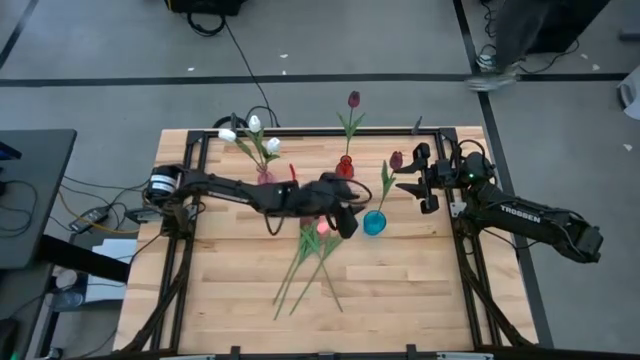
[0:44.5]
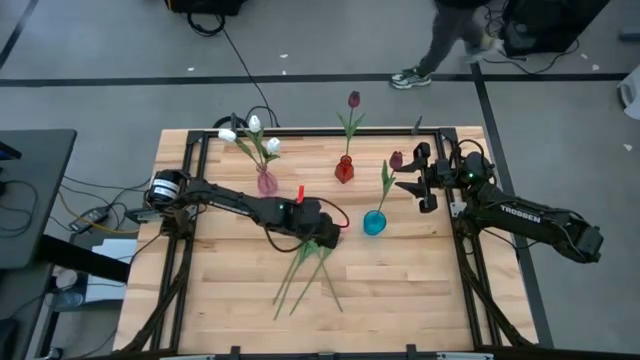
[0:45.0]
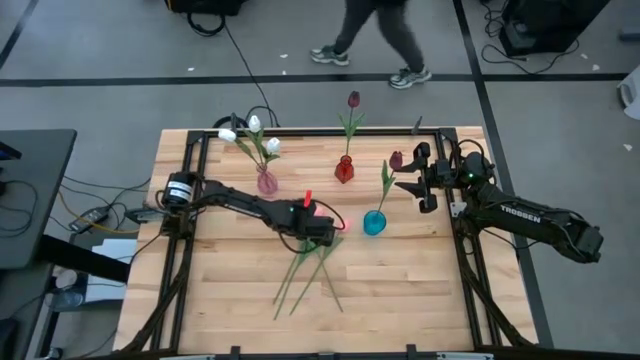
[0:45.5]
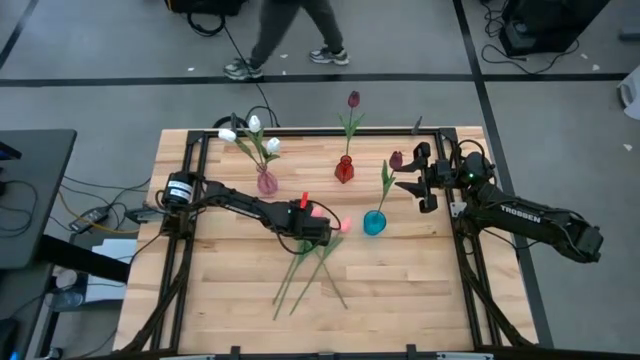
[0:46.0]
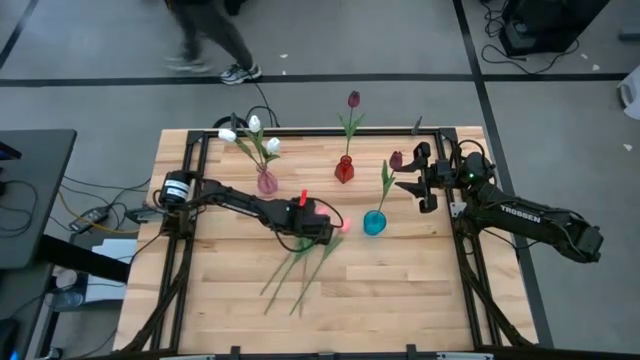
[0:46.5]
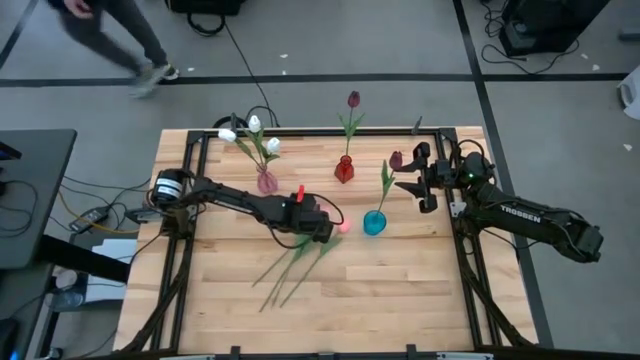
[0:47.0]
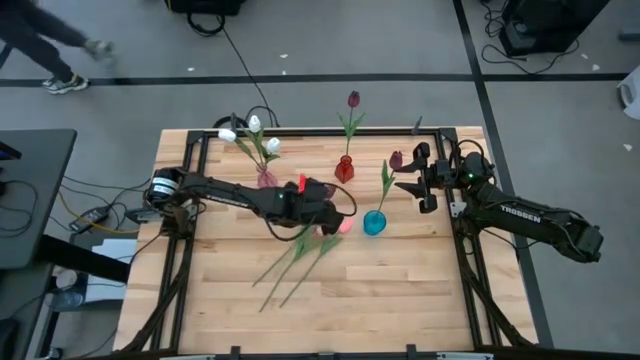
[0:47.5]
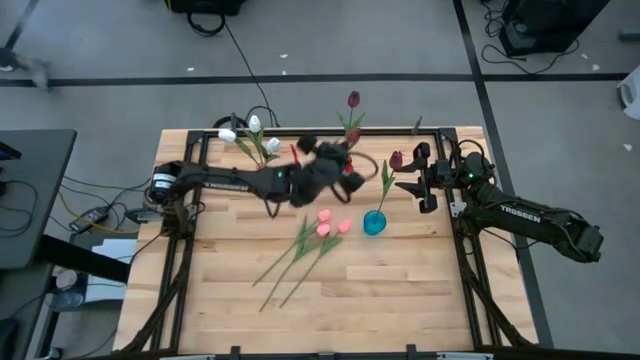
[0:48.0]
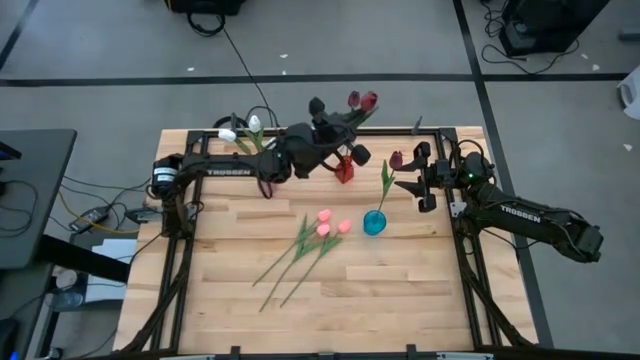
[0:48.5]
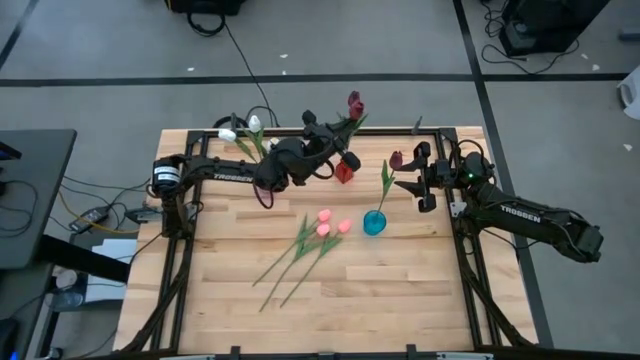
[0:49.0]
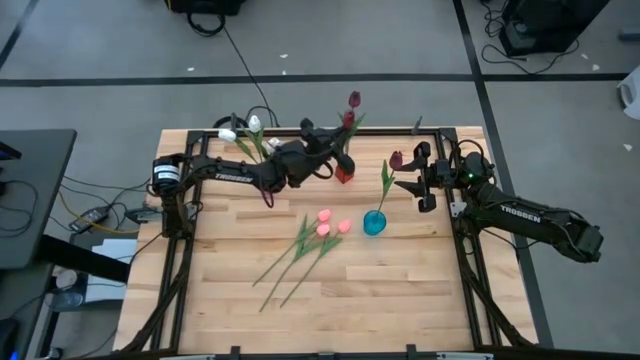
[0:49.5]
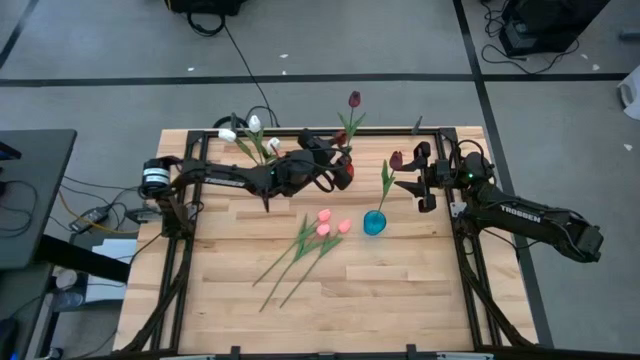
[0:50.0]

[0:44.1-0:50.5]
Task: Sort flowers into vase by color
Put the red tulip into the red vase

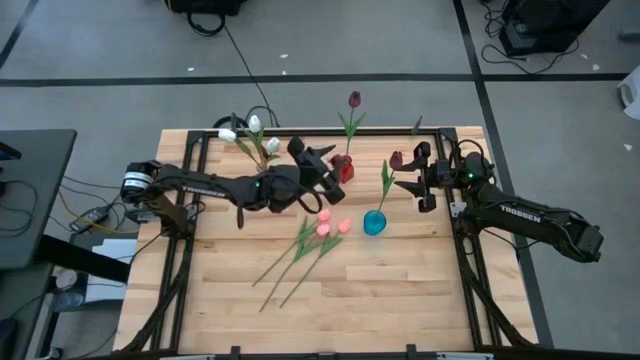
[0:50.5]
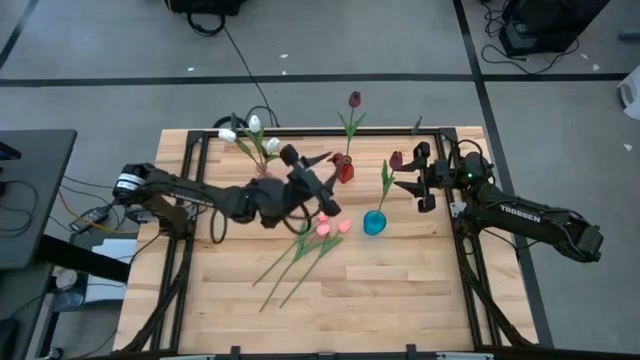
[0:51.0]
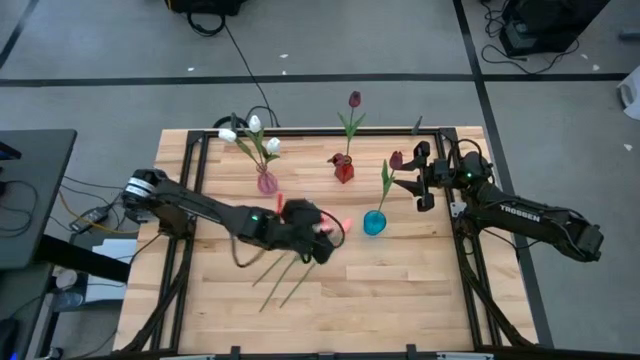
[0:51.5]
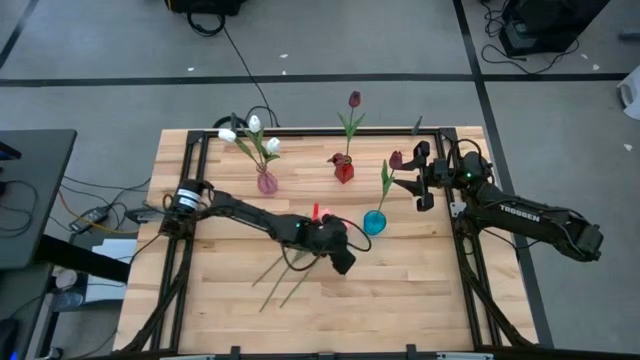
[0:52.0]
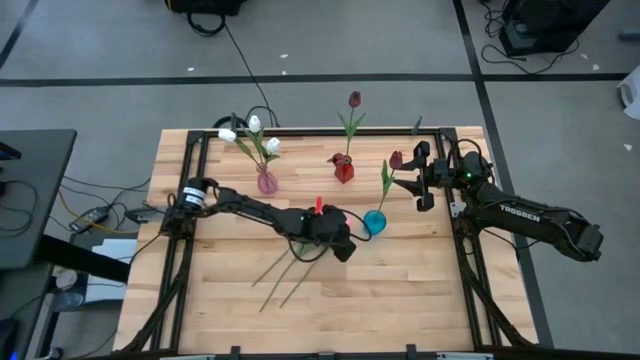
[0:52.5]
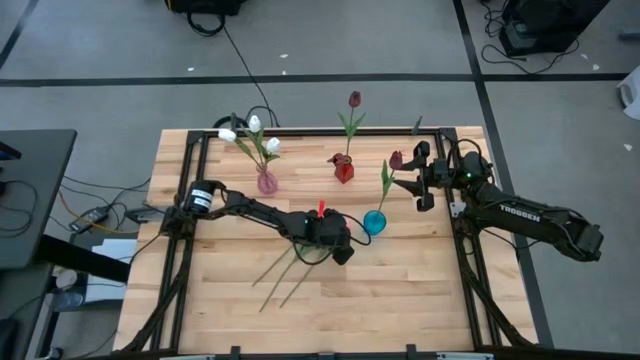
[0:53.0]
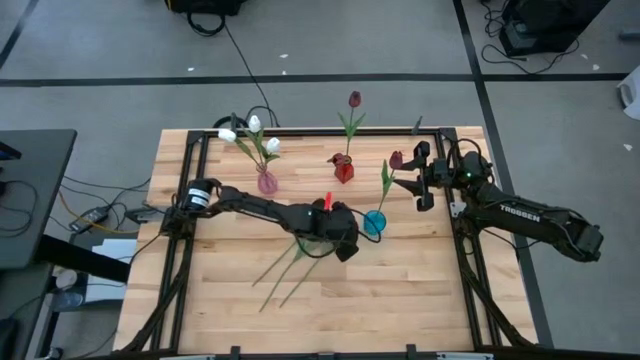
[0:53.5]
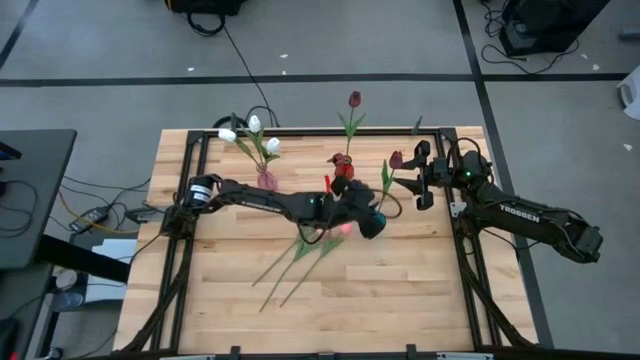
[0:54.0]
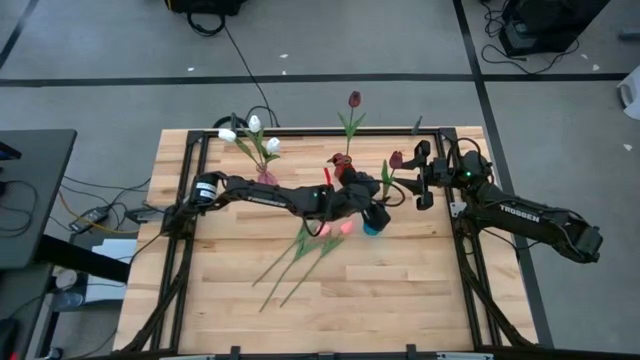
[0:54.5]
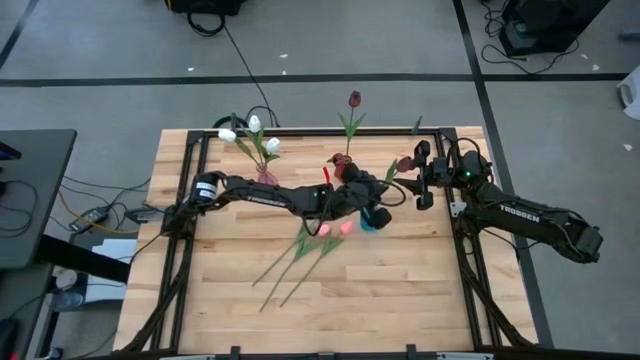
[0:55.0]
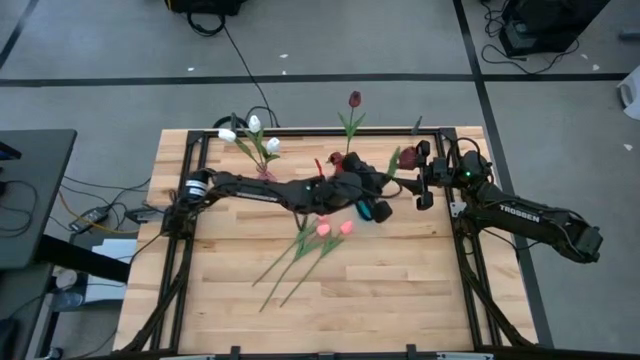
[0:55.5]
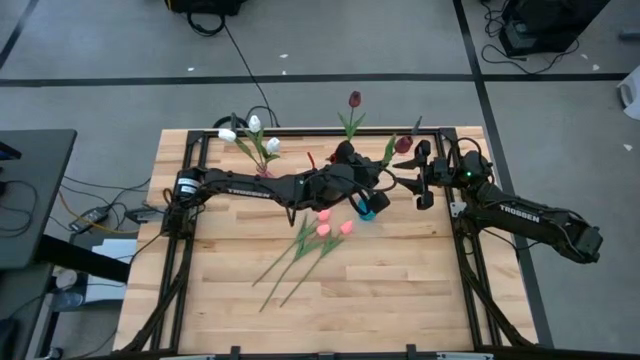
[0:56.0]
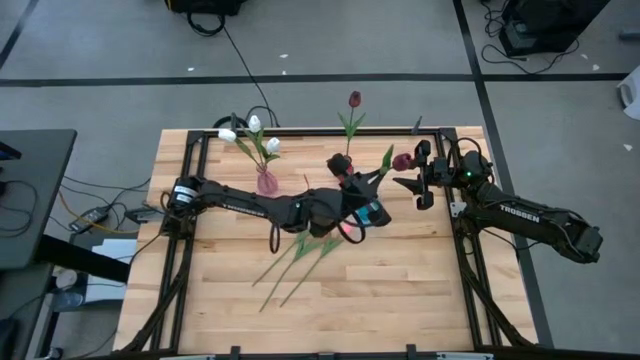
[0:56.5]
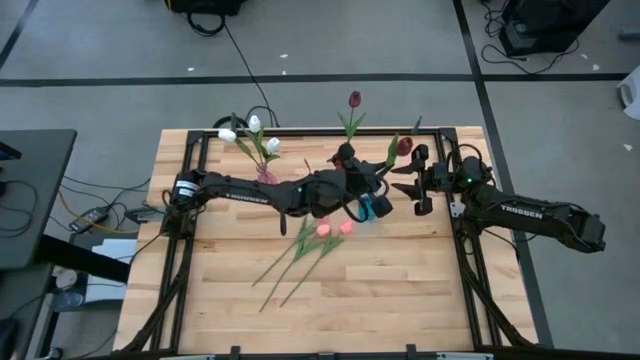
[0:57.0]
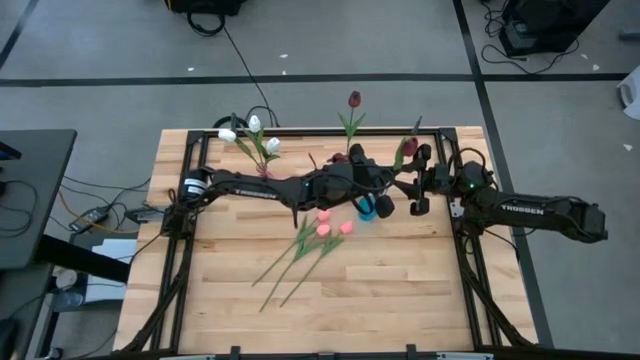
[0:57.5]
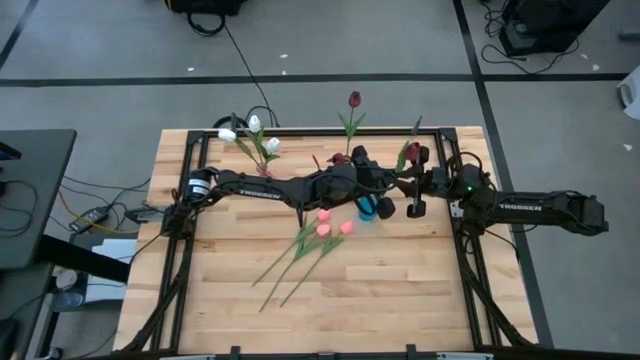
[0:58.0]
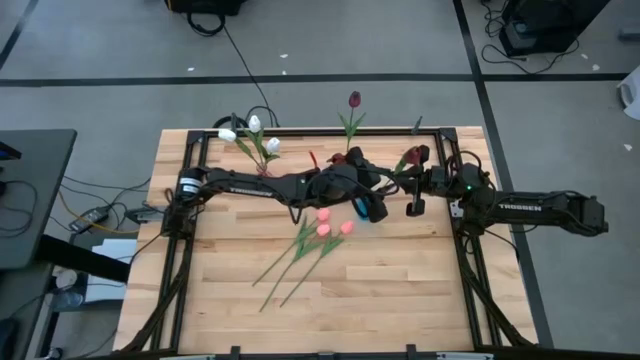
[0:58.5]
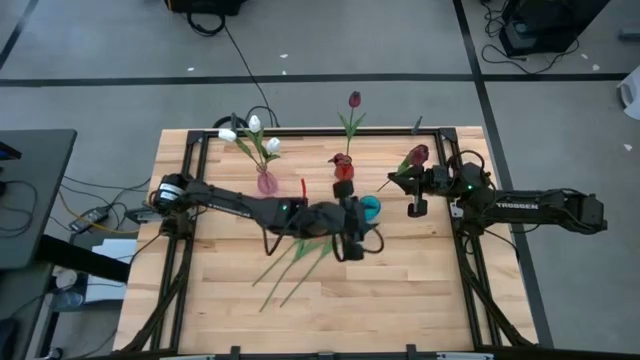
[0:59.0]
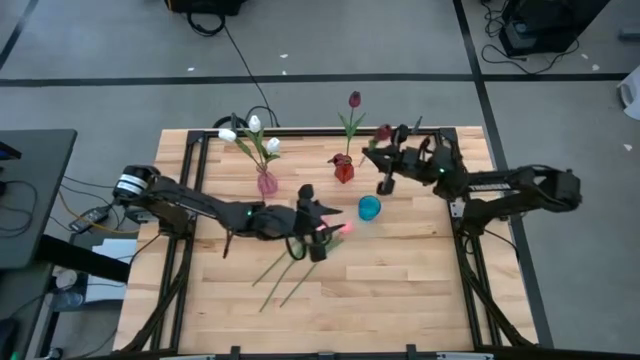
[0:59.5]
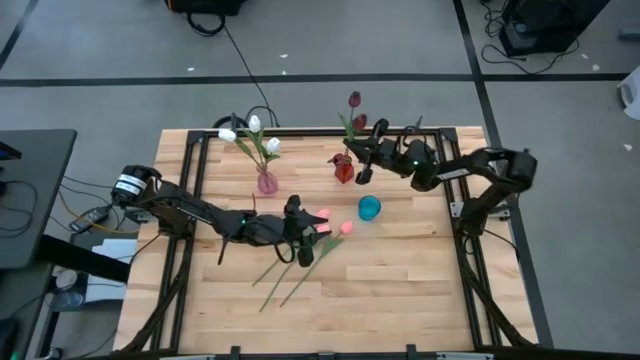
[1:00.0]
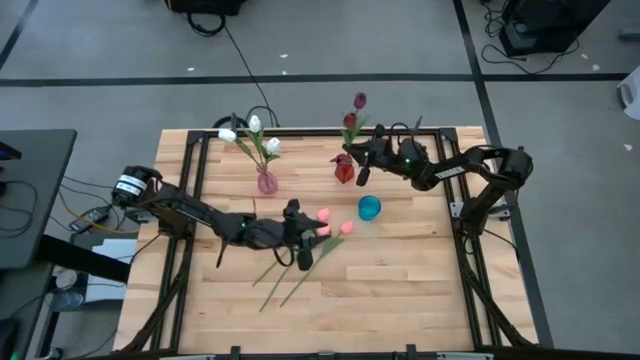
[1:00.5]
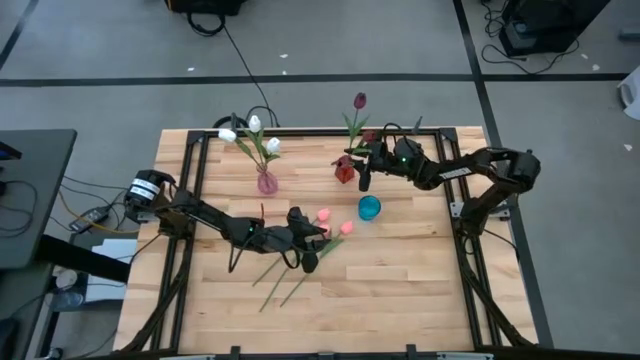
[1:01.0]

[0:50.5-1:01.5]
Move the red tulip into the red vase

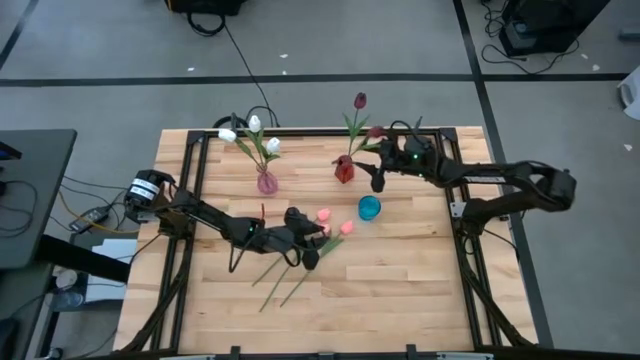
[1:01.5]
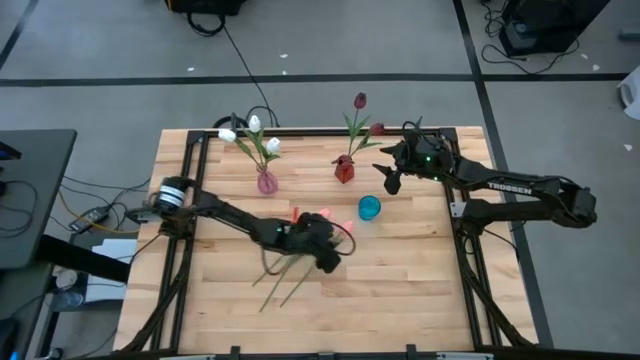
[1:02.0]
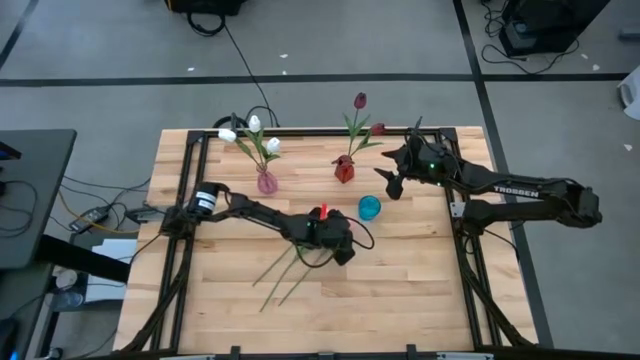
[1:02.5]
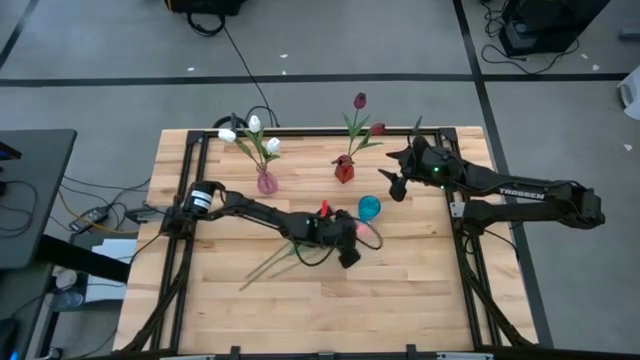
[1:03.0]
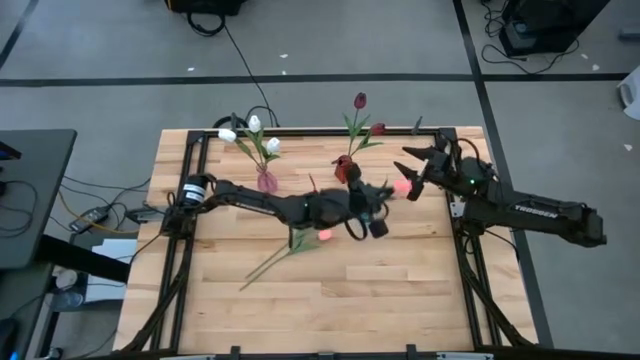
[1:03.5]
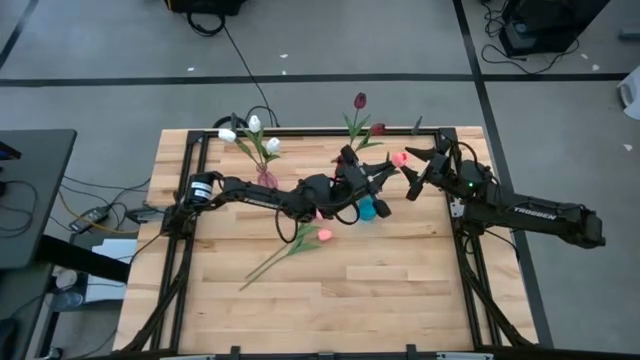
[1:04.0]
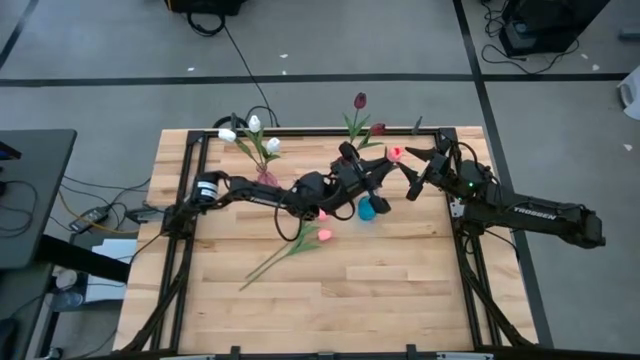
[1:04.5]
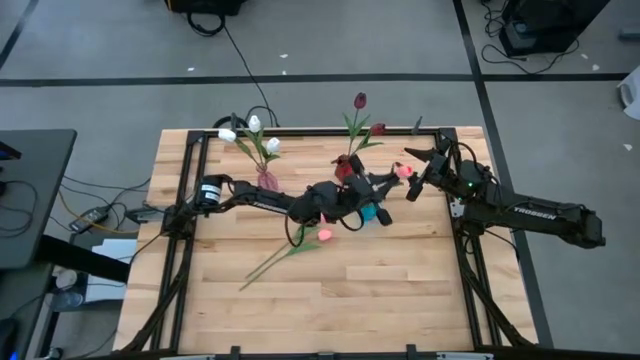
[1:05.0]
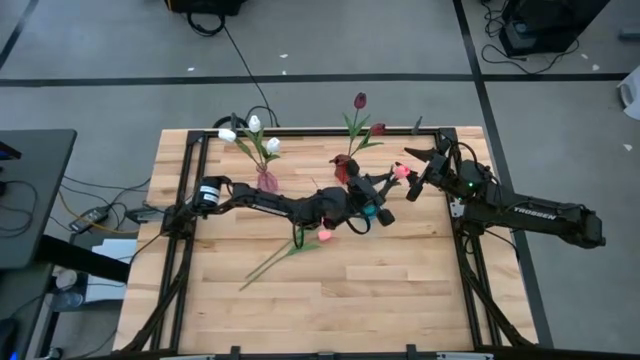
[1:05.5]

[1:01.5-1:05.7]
Put the pink tulip into the blue vase

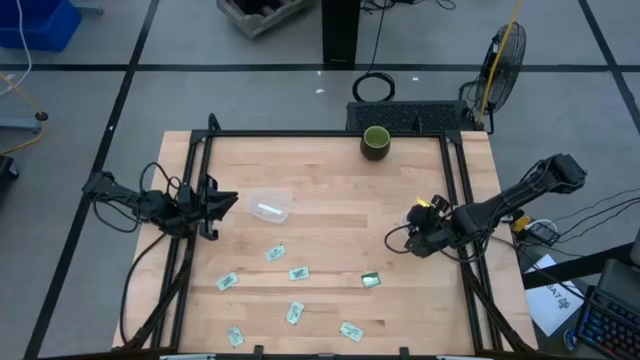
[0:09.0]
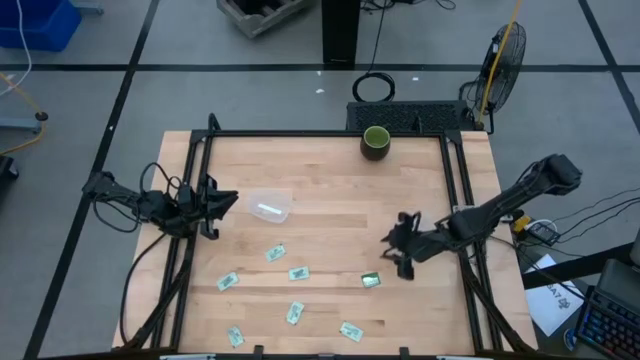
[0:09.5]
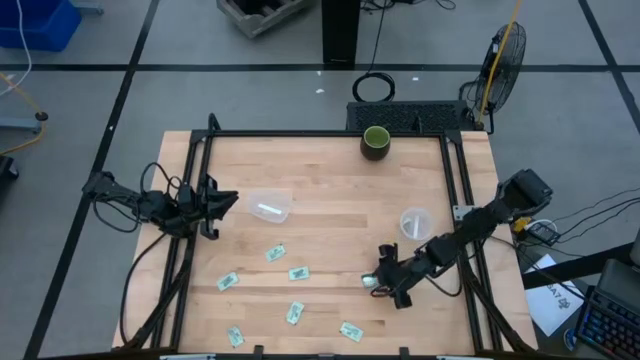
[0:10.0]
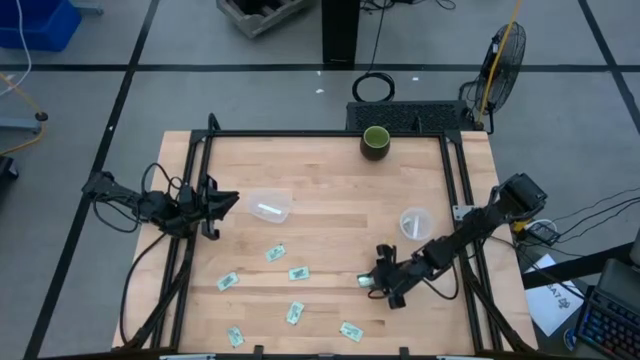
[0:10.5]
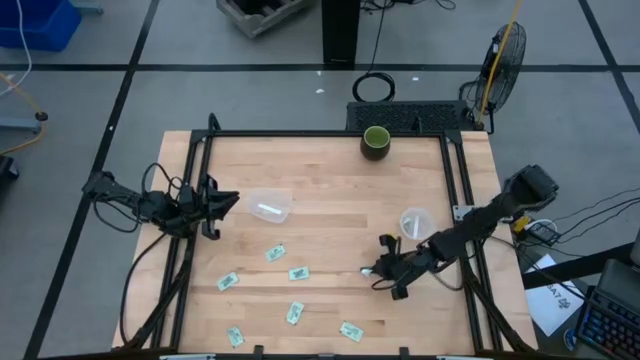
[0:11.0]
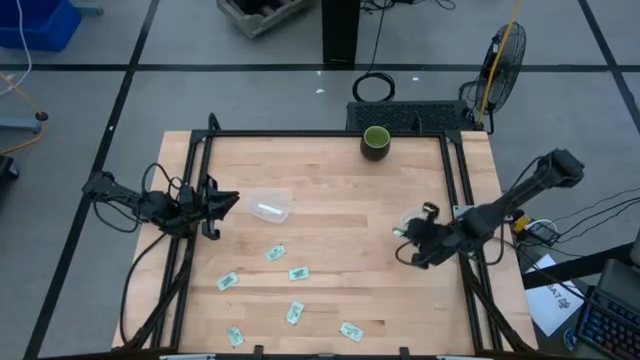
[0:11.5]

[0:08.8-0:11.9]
Task: Pick and place Stevia / Truvia into bins
Put the green truvia packet into the transparent circular container
